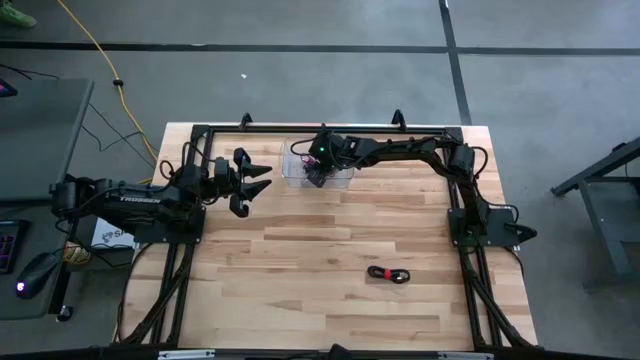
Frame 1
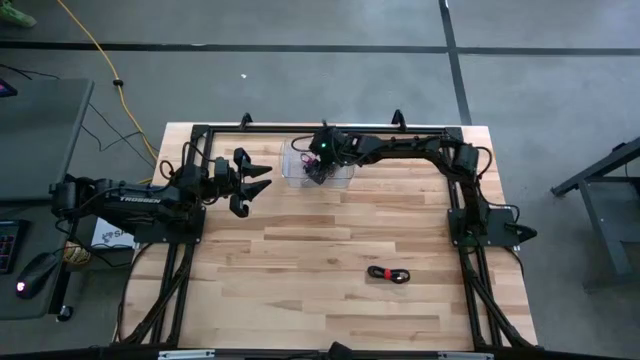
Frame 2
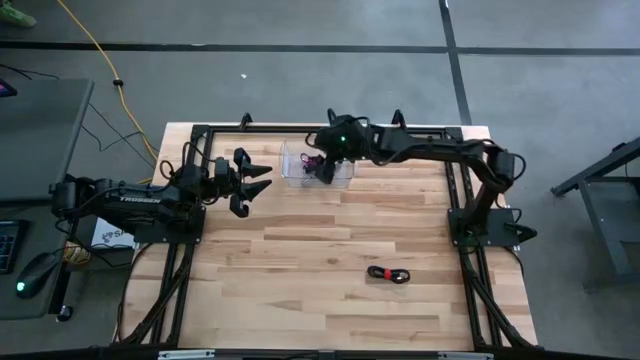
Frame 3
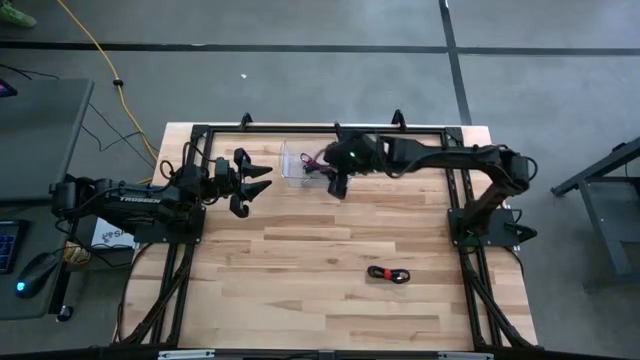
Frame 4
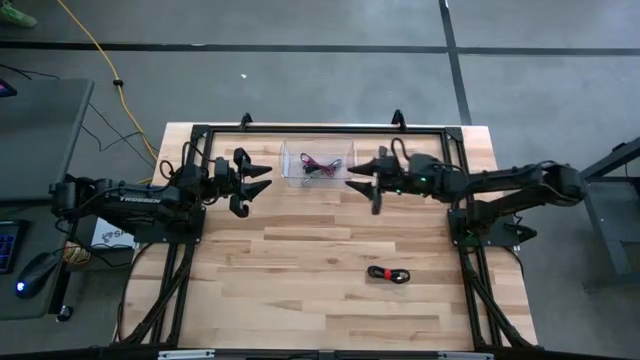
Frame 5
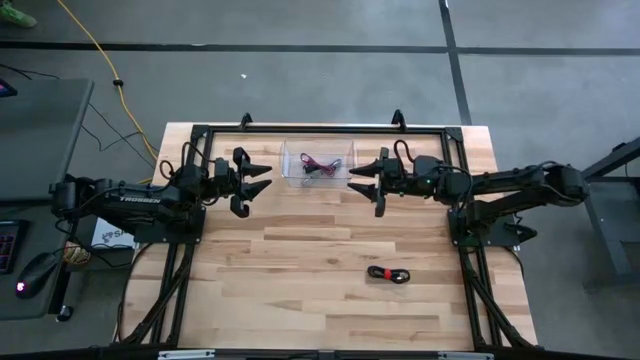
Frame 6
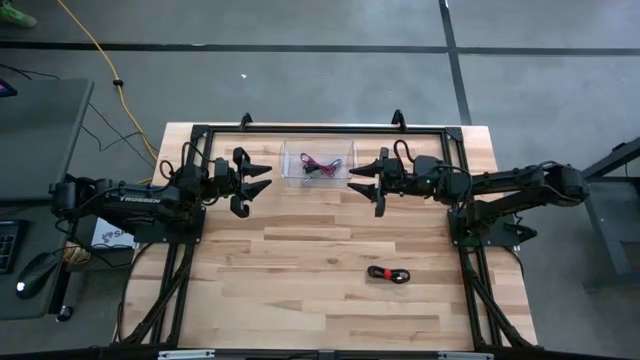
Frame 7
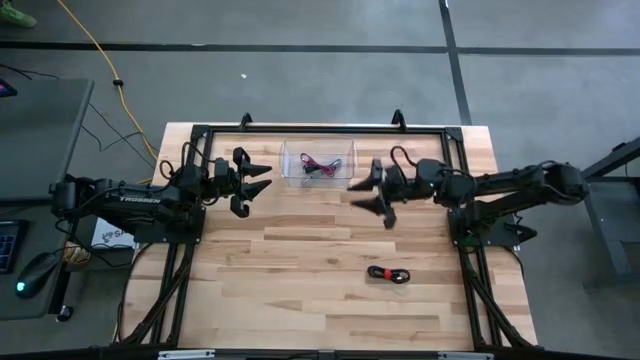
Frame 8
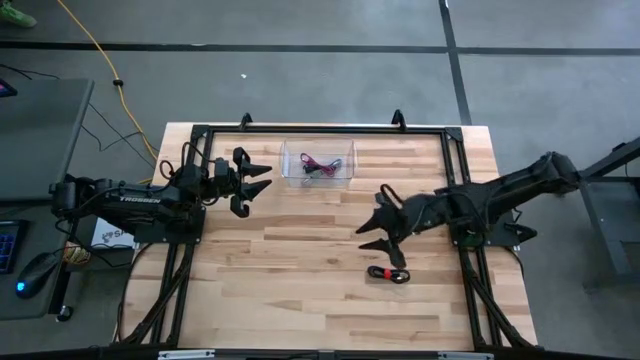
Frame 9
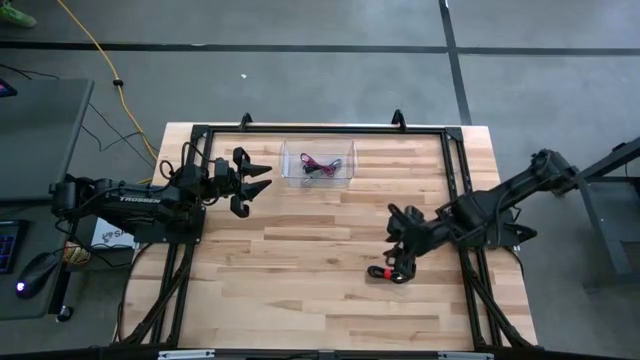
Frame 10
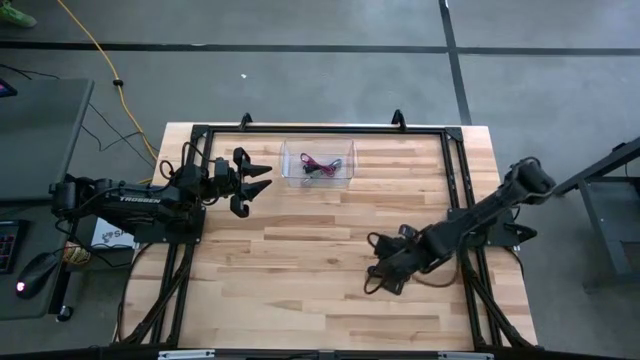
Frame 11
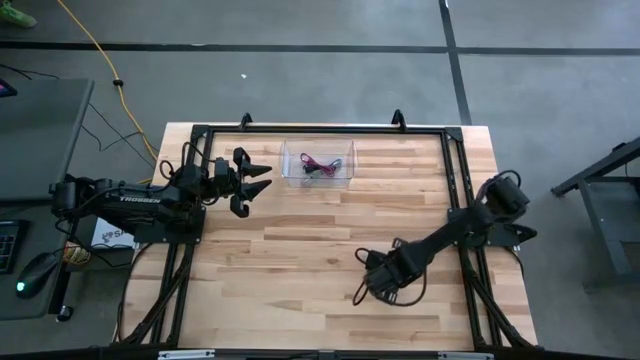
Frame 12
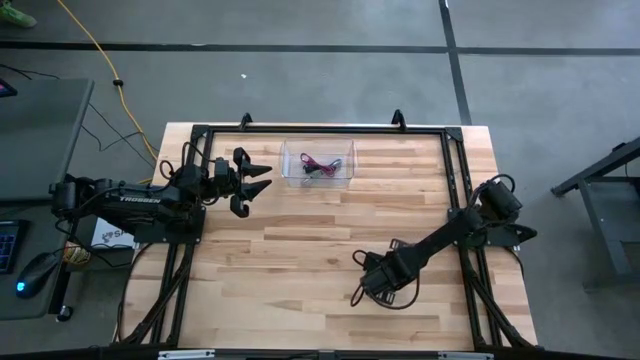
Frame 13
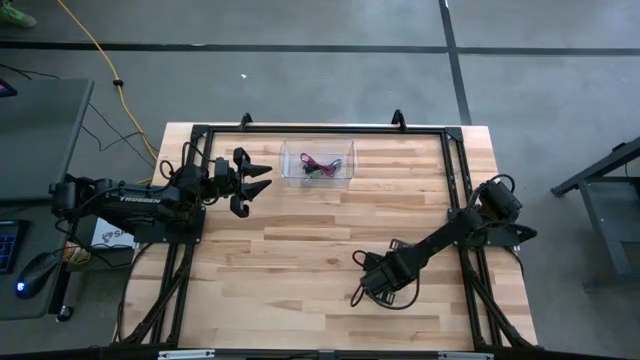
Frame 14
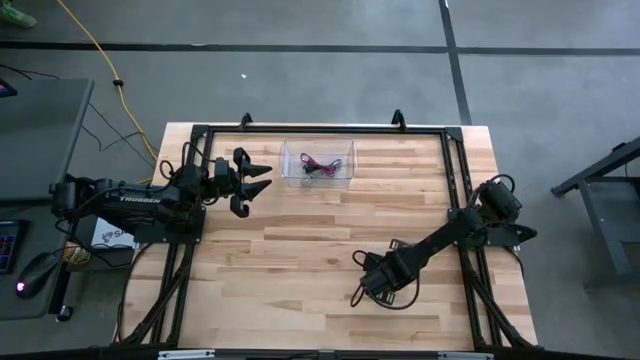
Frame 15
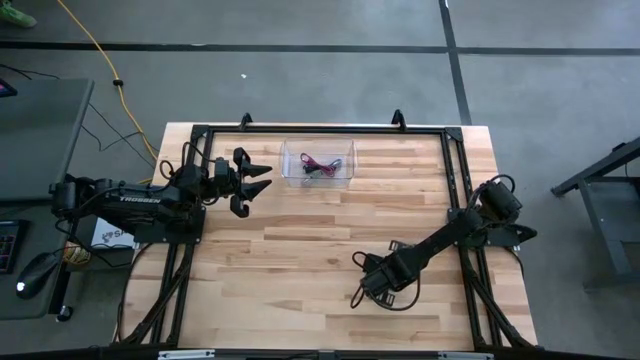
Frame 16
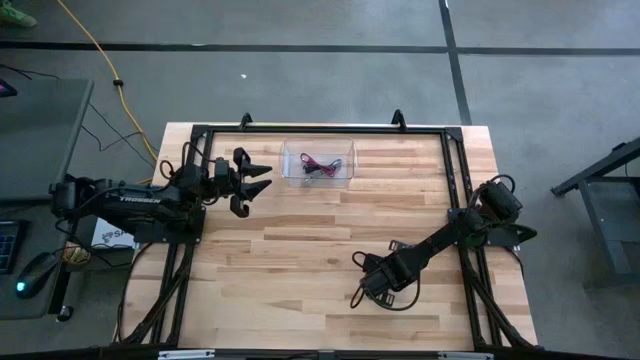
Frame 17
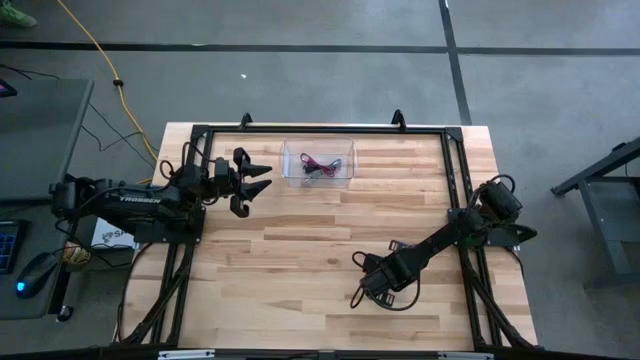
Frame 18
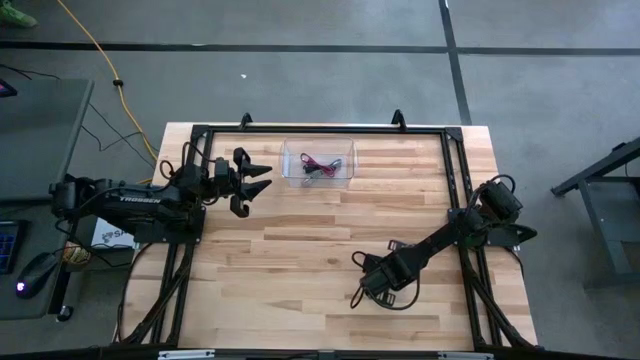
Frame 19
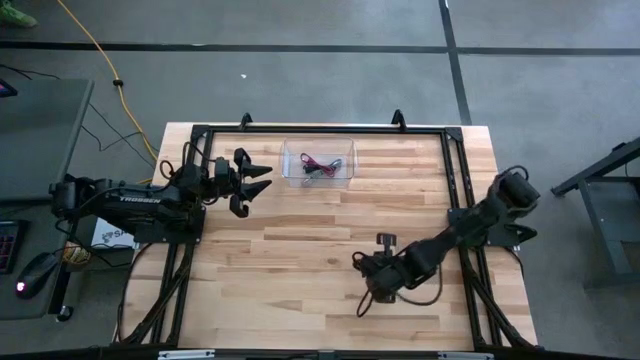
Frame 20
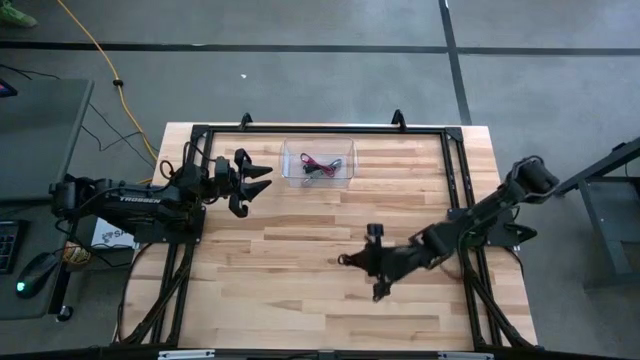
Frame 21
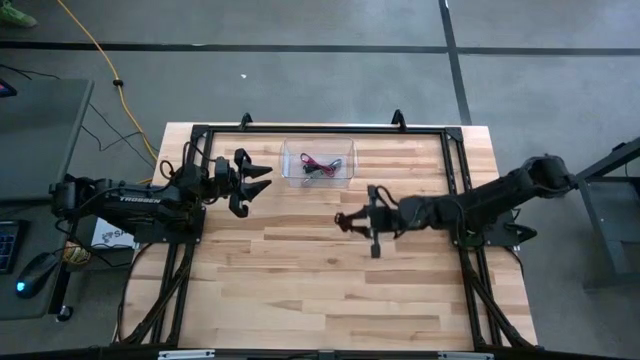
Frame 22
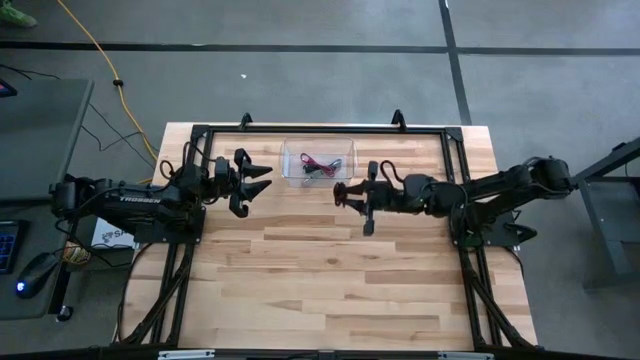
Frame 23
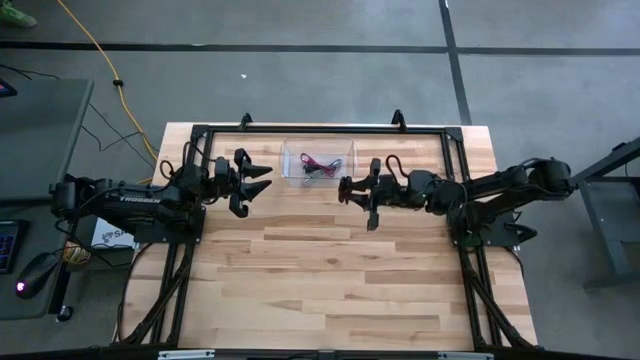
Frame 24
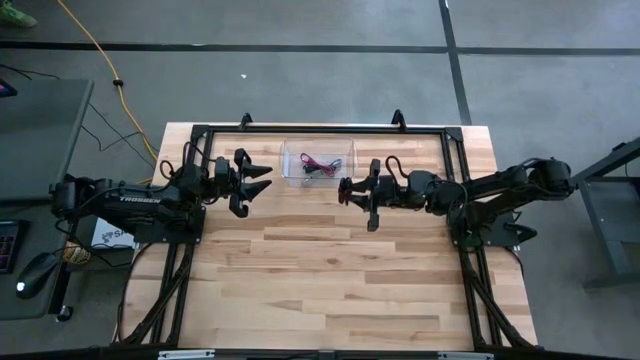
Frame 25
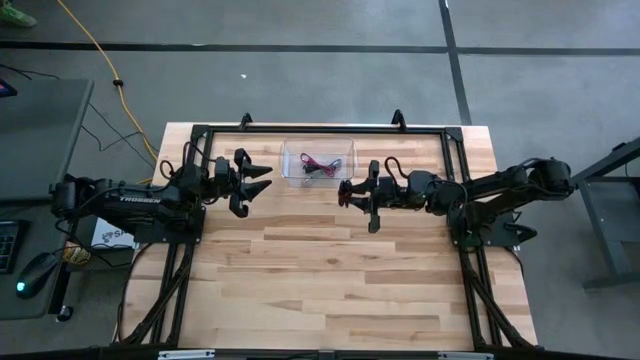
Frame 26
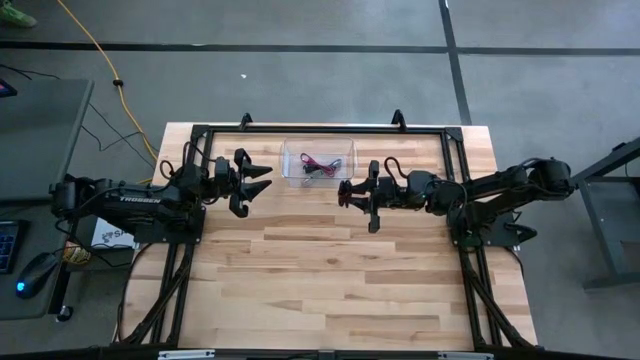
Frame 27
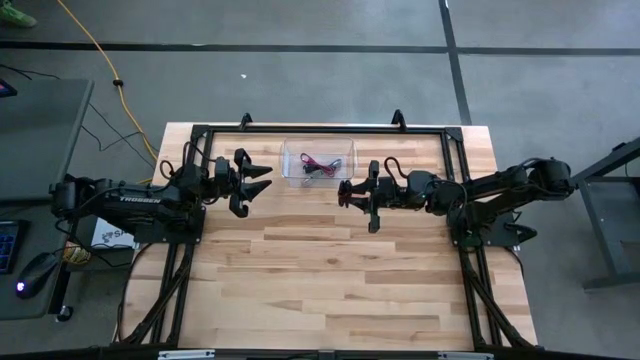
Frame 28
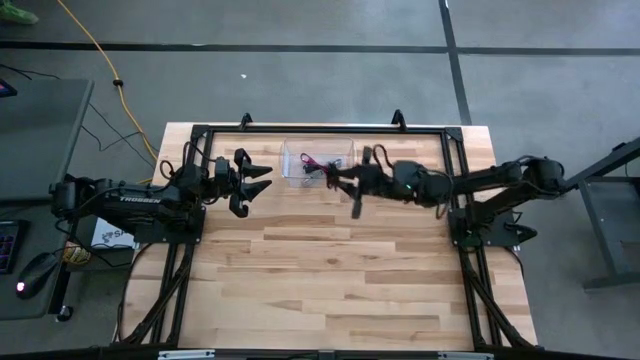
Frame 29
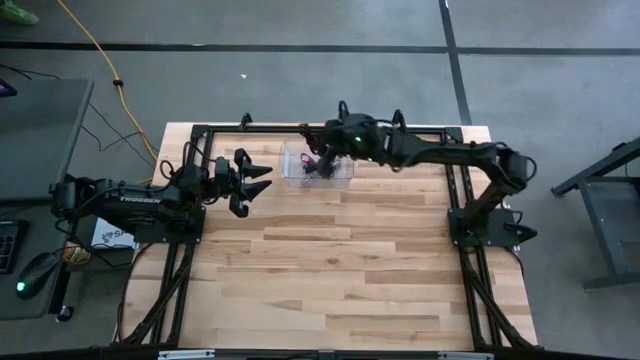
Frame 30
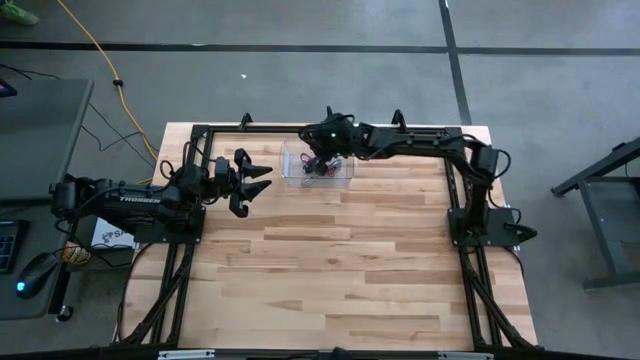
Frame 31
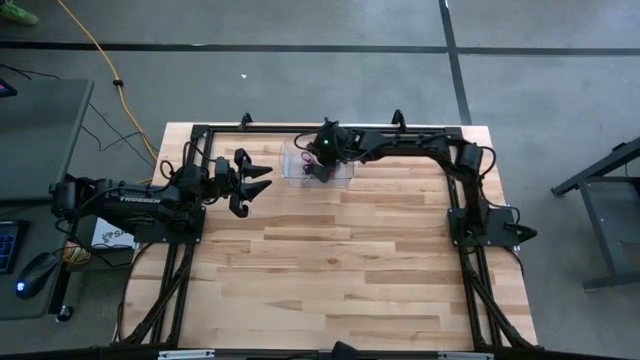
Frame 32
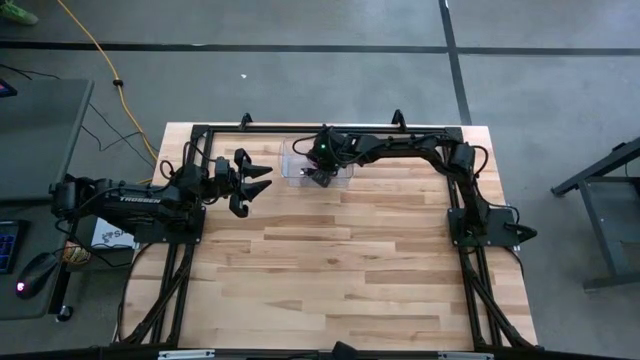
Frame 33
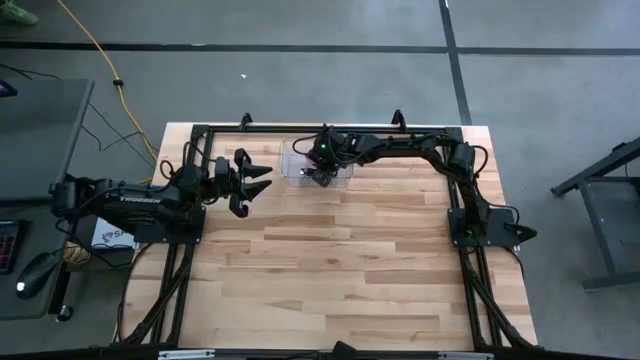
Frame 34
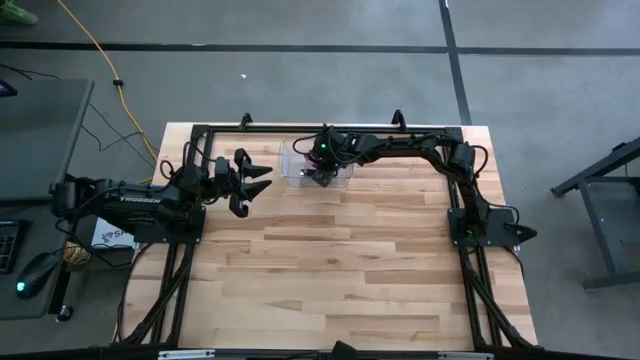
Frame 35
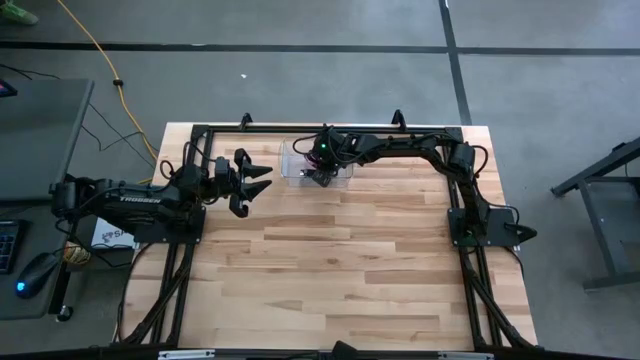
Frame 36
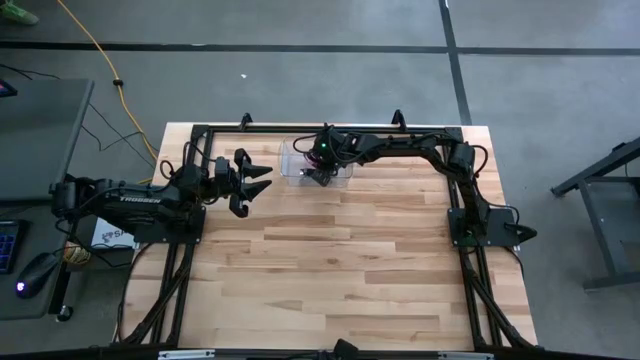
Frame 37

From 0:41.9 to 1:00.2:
Task: Pick and place USB-C Cables
Put the black charger cable into the transparent bin

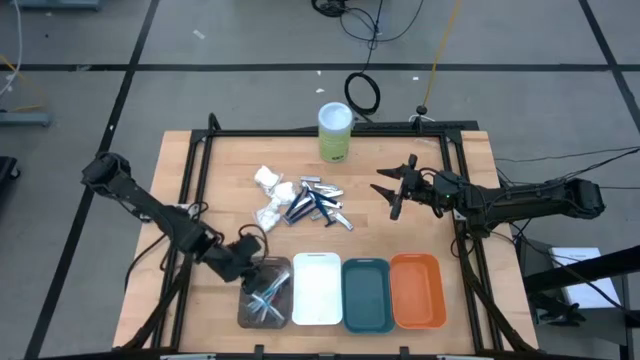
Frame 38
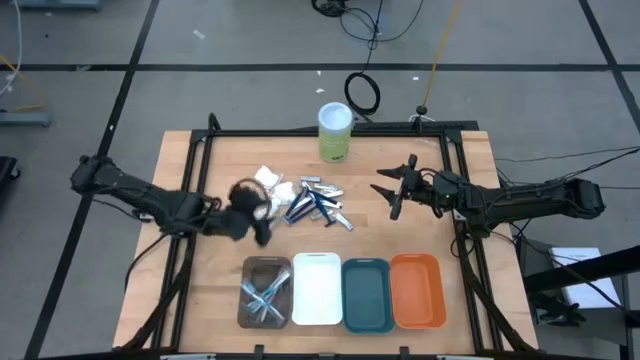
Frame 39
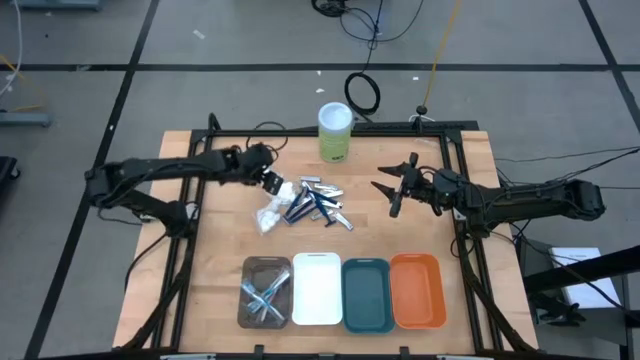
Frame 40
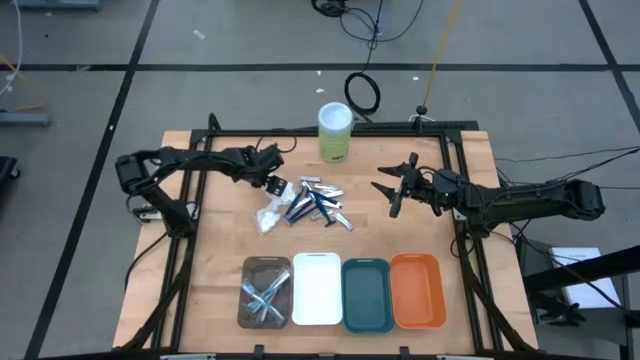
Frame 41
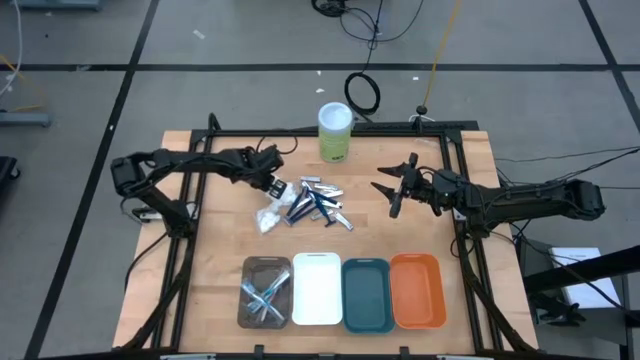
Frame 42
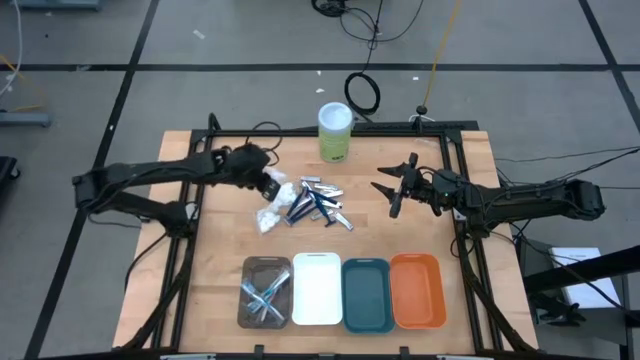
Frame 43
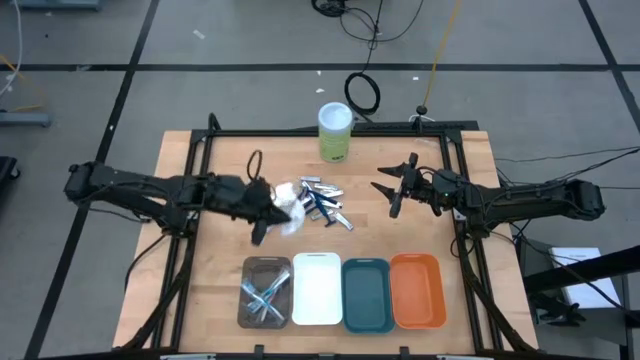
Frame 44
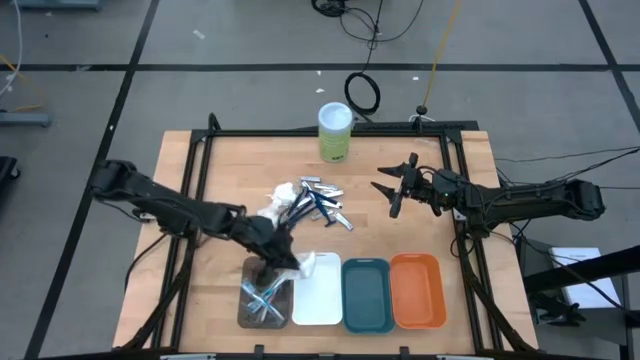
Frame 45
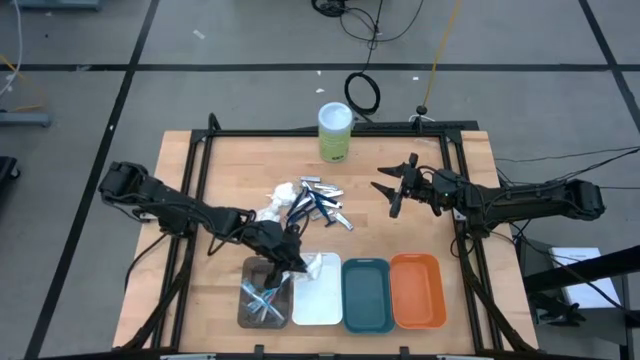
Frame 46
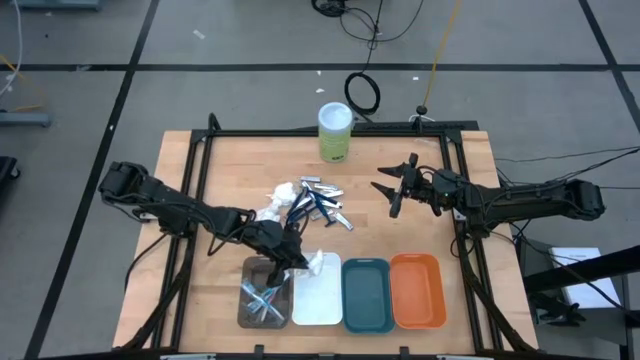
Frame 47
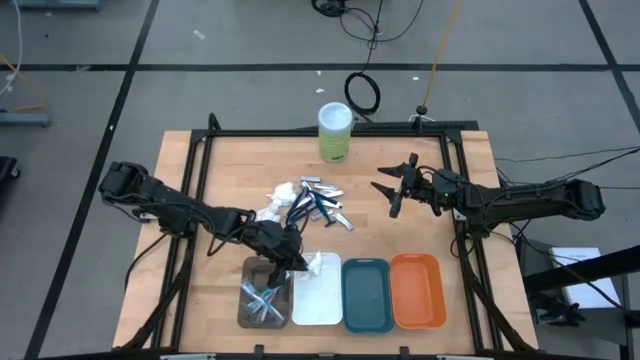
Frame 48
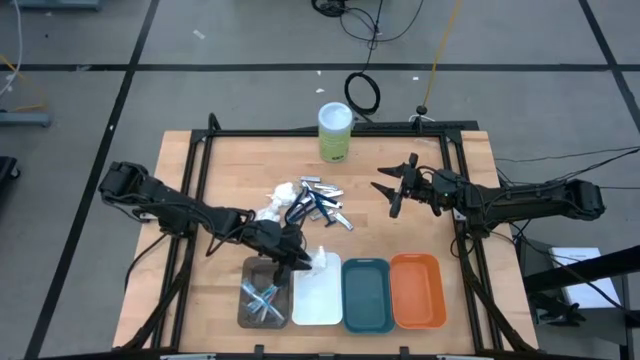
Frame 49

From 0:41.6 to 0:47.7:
Task: Pick & Place Travel size toiletries
Put the white cotton pack into the white bin
